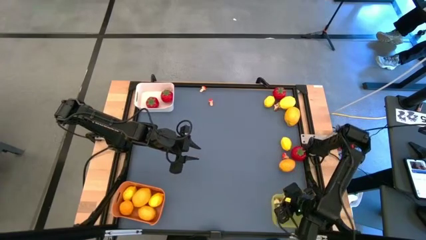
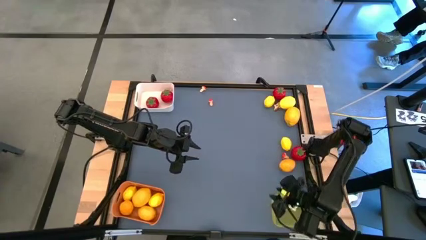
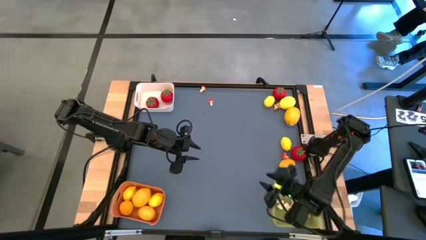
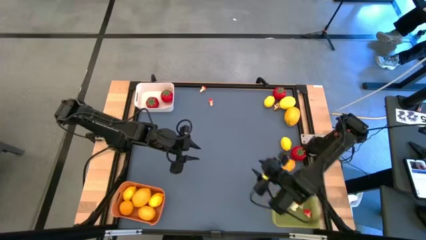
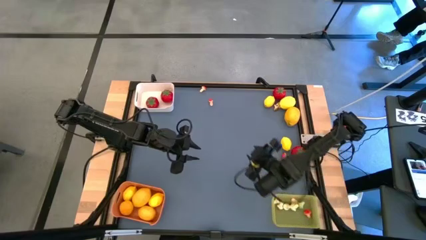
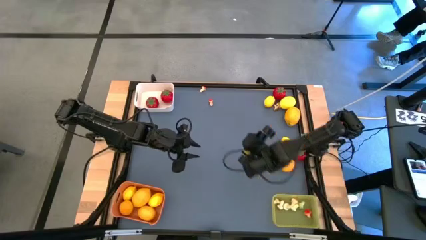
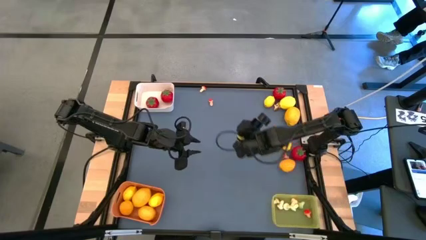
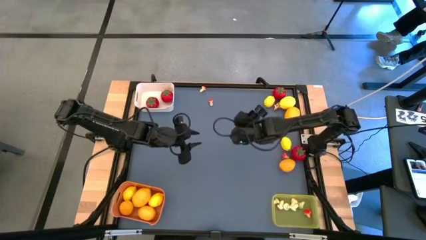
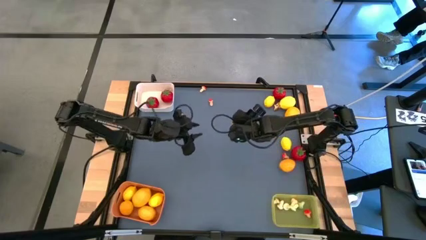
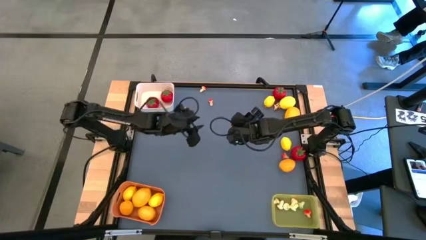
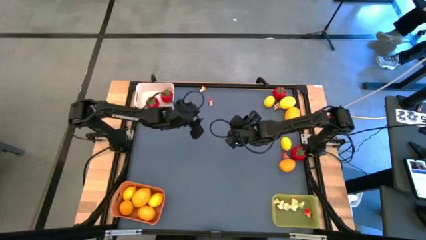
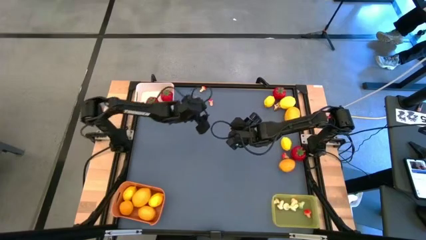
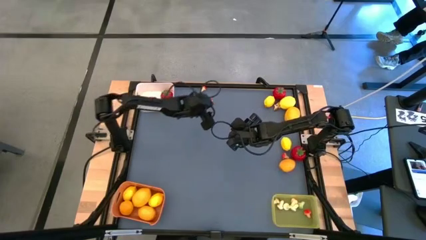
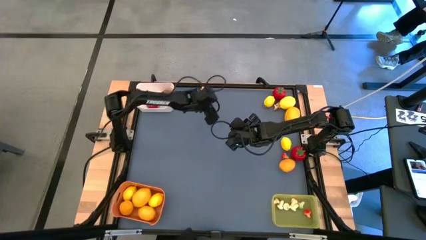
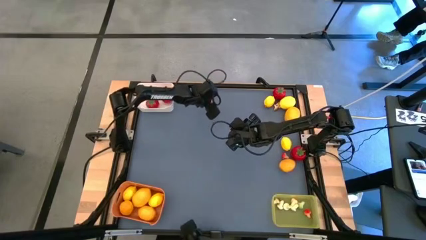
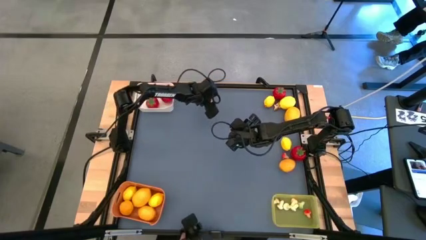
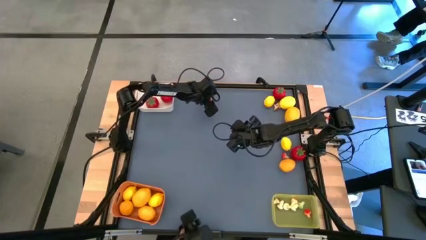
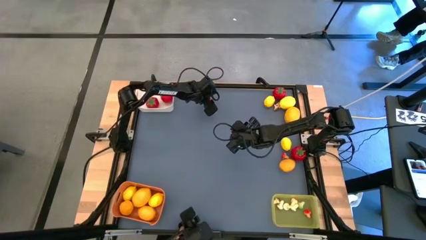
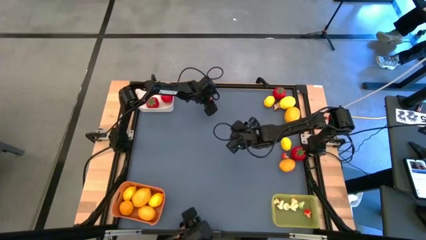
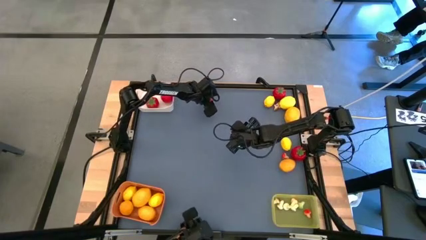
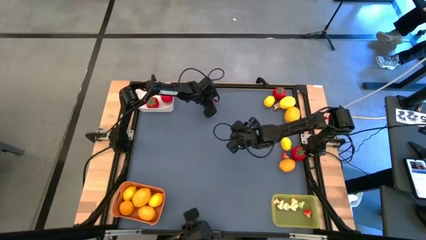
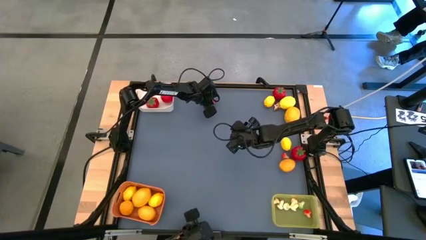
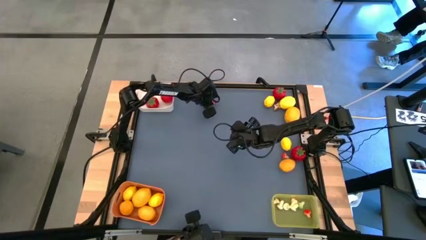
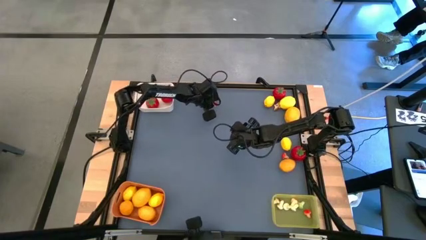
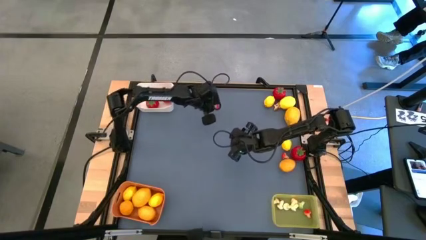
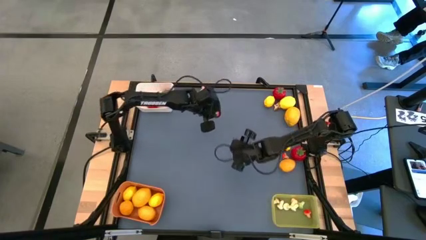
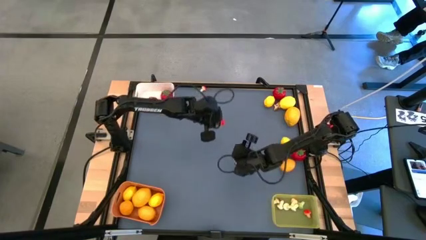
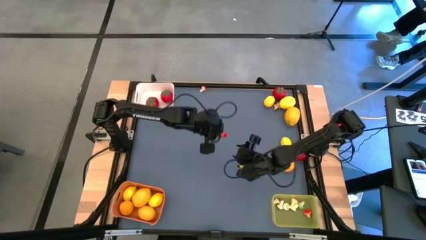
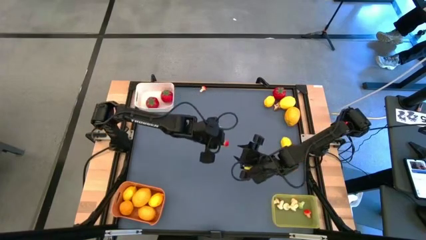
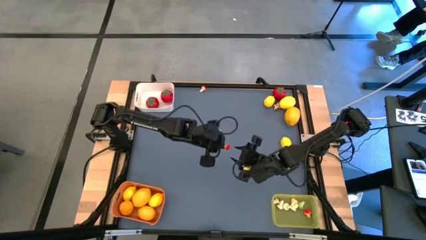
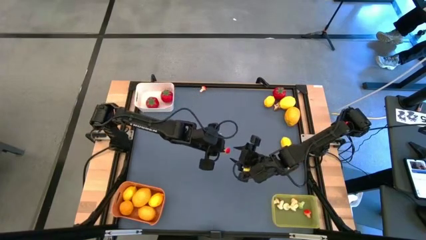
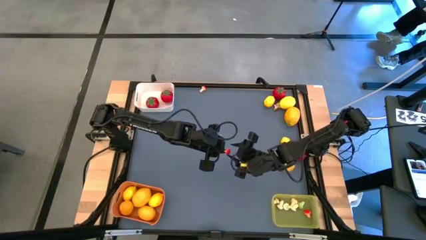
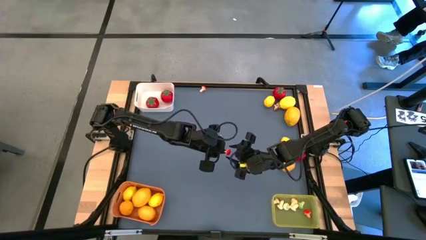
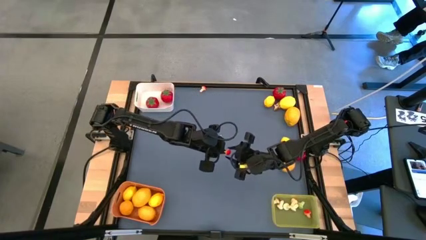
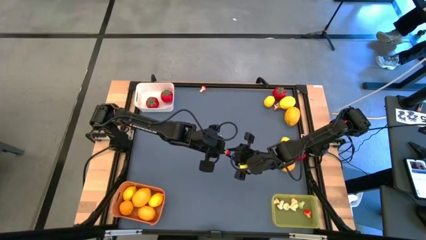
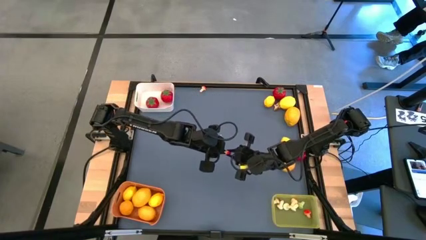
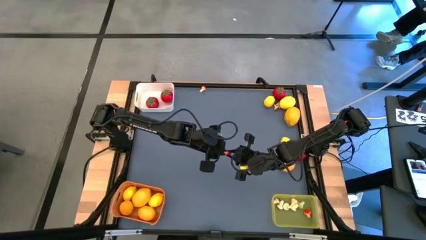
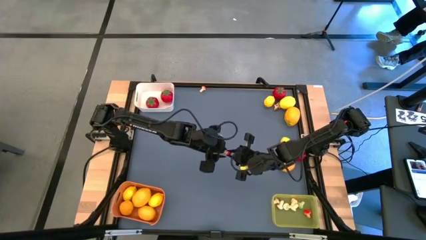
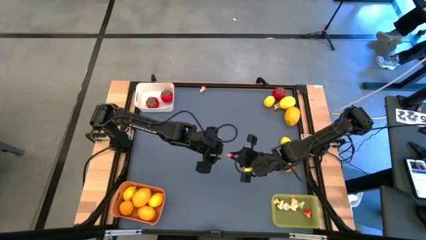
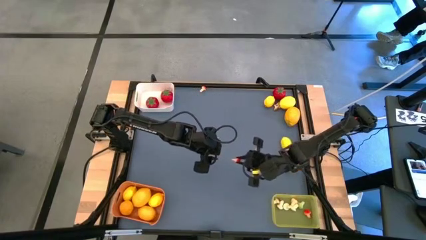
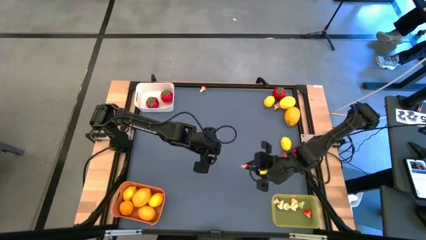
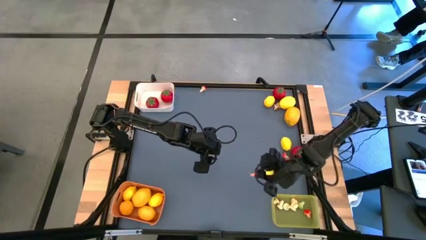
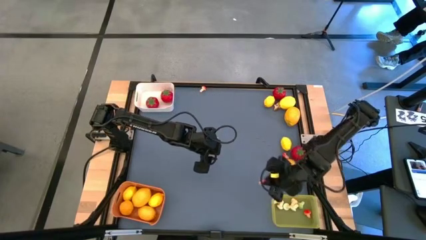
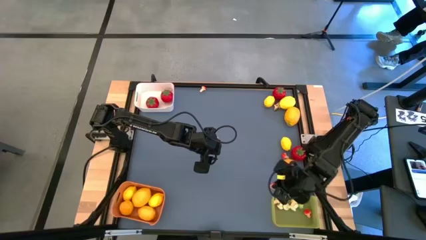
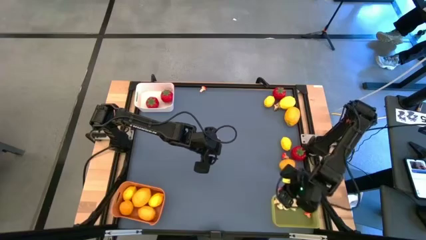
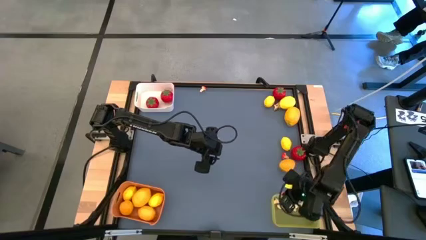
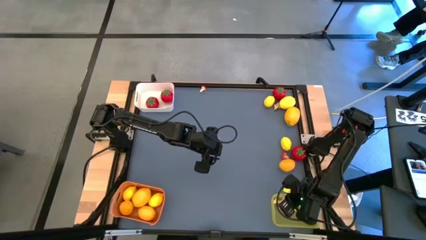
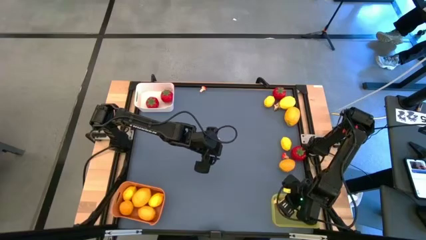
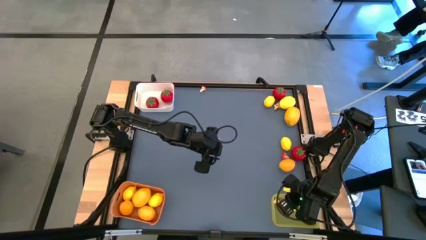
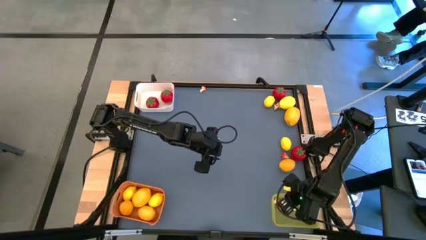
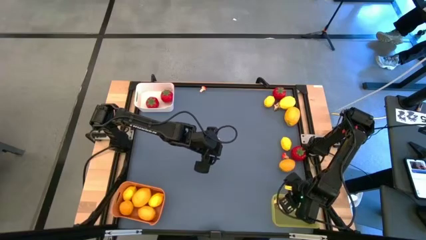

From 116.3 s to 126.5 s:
Task: Sort produce into baskets
Put the red mushroom into the yellow bin

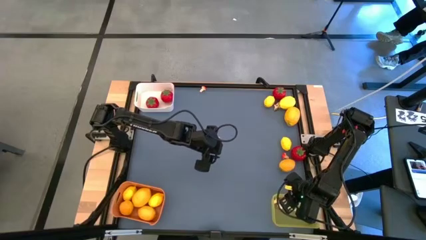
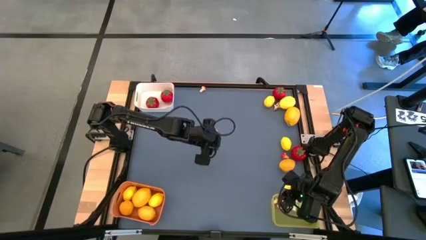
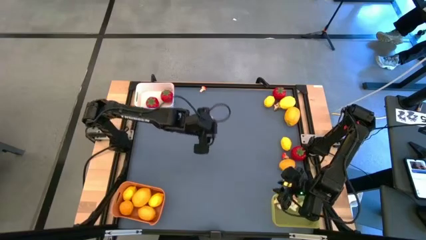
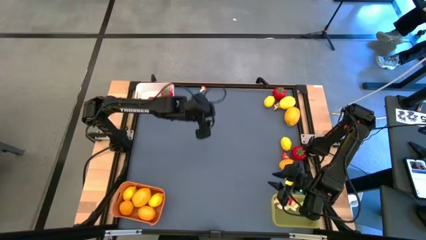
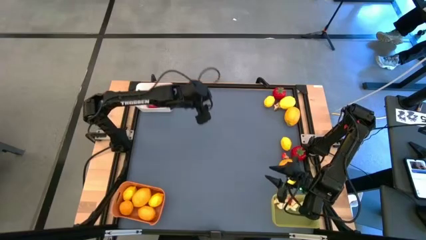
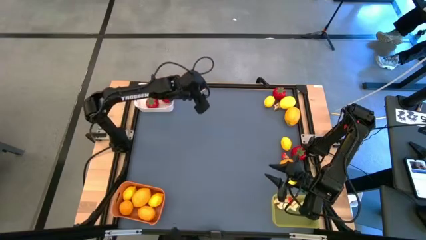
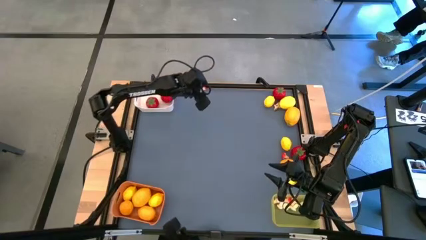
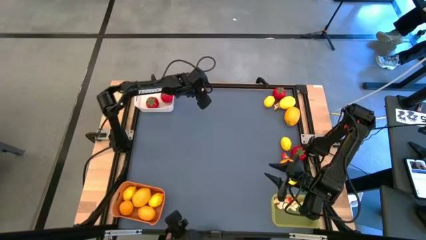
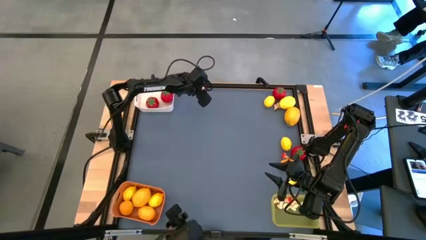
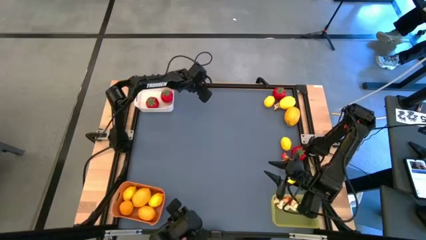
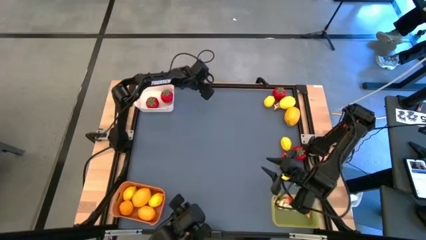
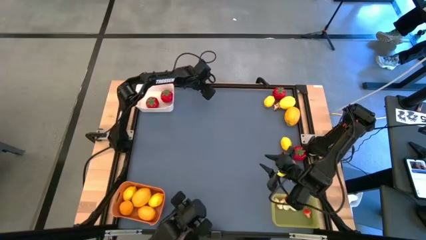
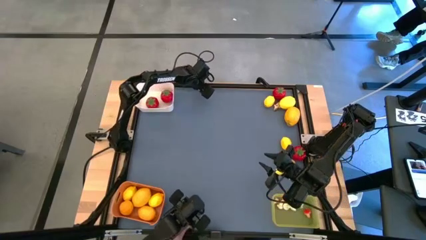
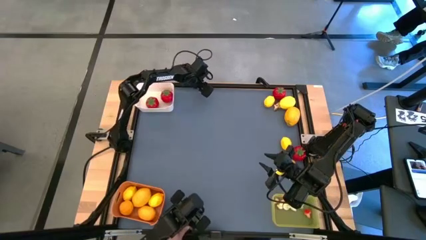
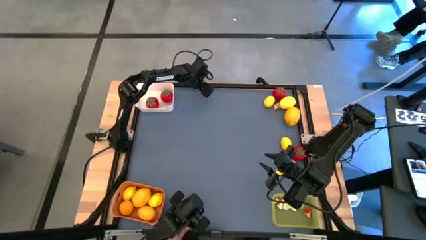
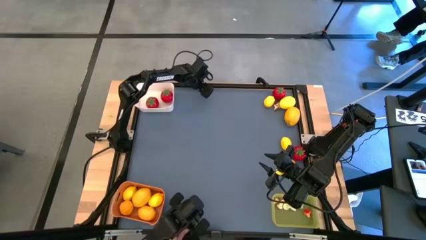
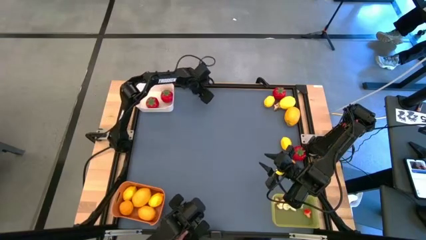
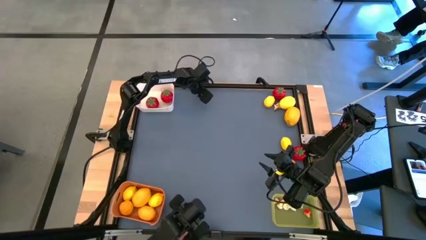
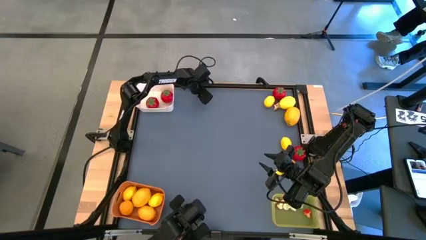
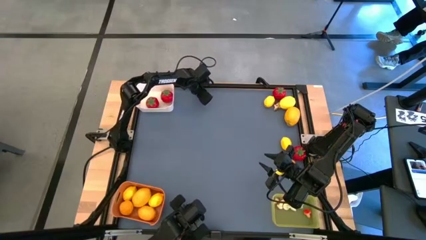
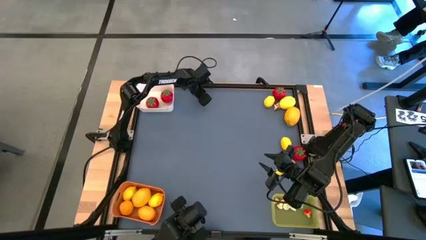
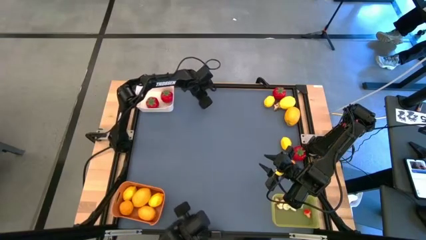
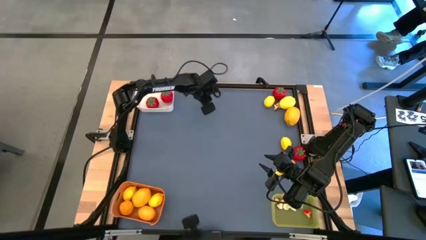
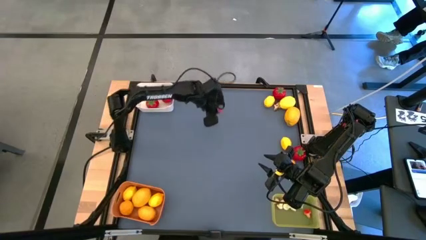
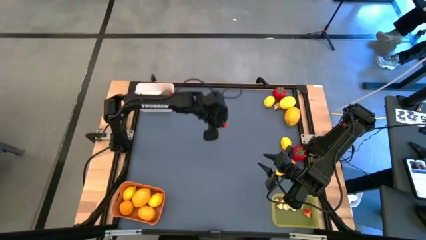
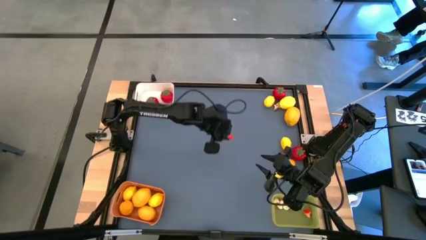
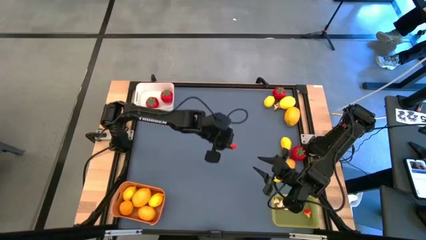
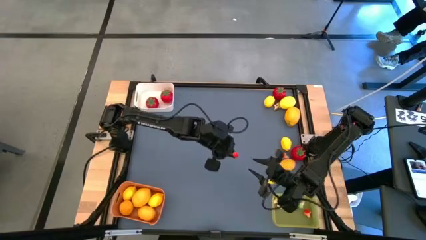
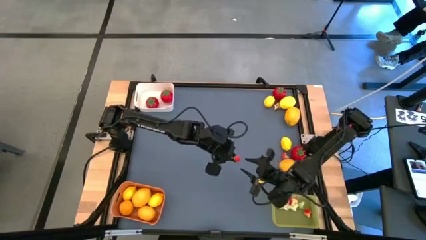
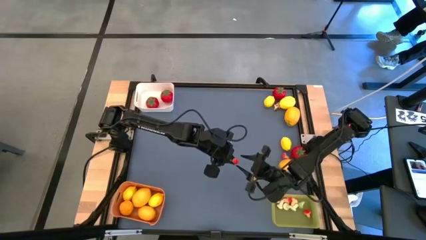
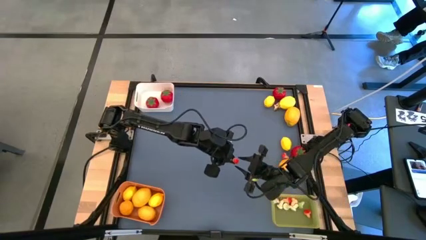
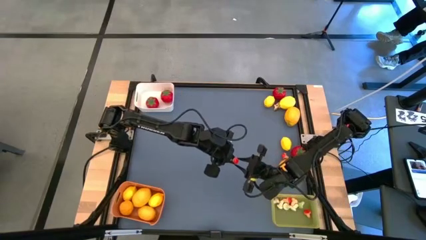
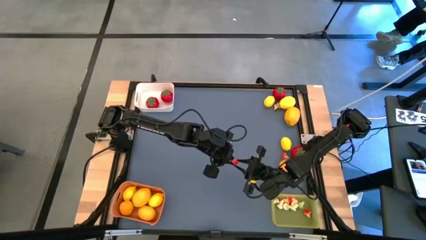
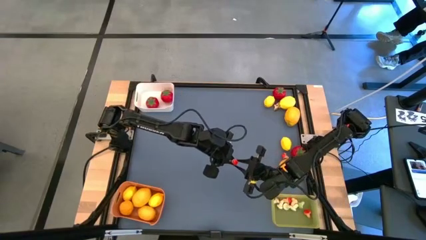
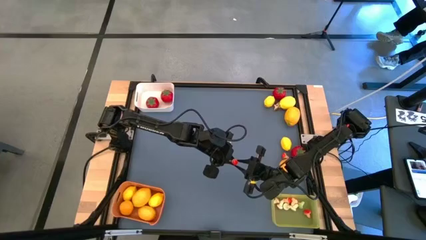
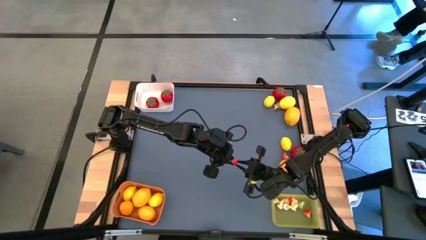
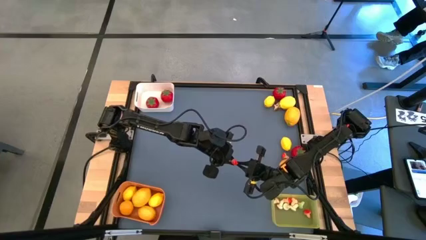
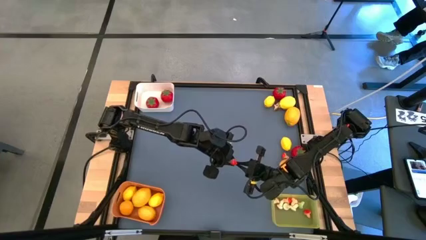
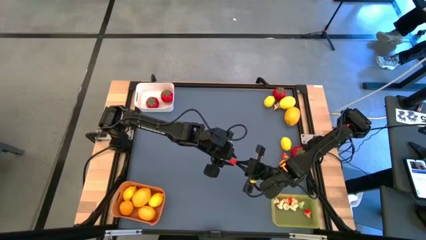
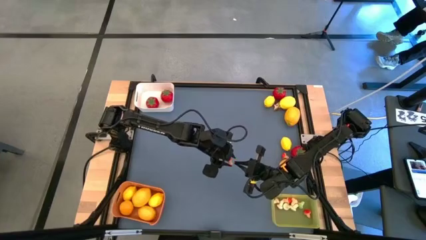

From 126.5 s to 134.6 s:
Put the red mushroom into the yellow bin
